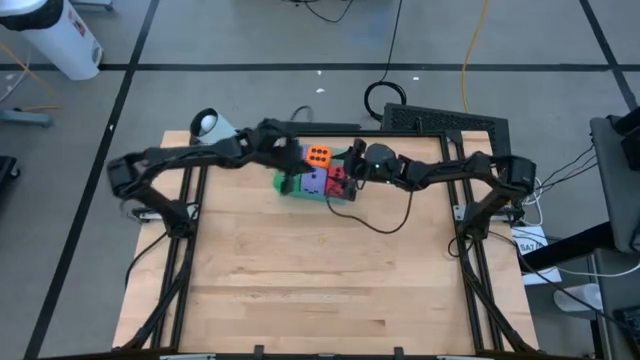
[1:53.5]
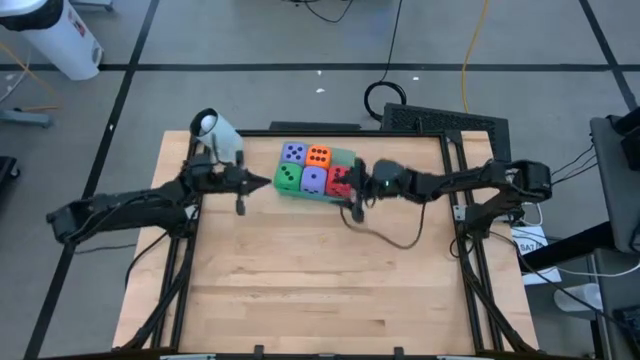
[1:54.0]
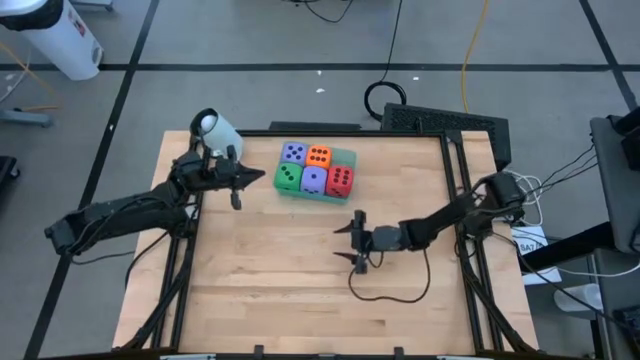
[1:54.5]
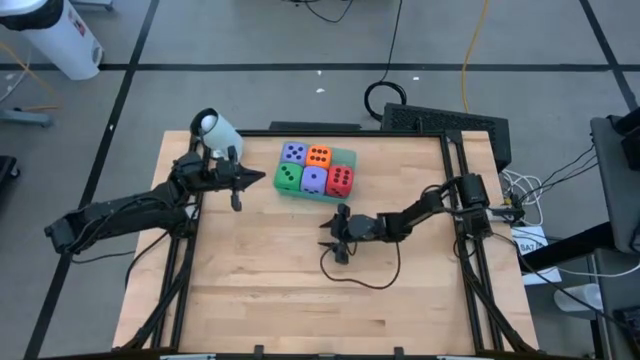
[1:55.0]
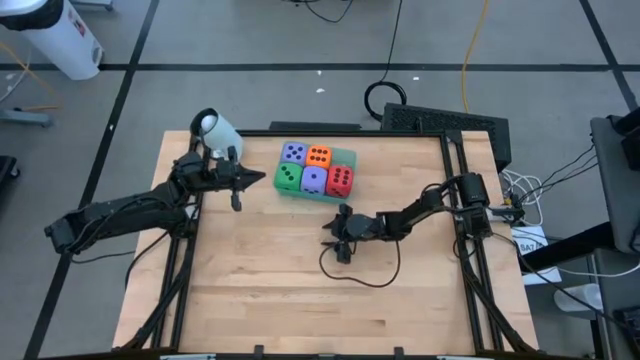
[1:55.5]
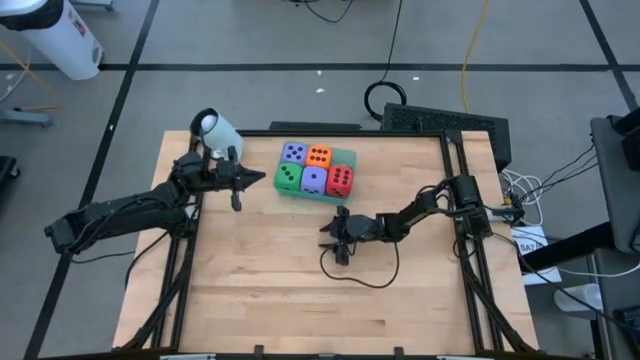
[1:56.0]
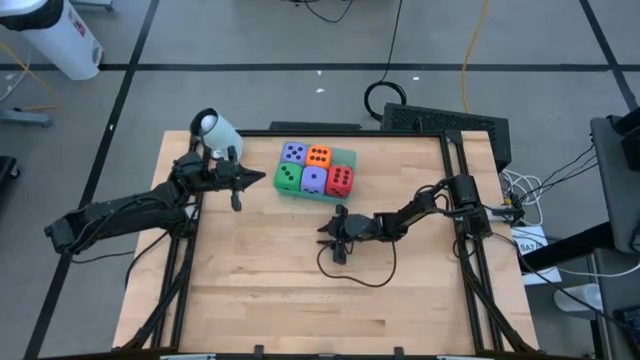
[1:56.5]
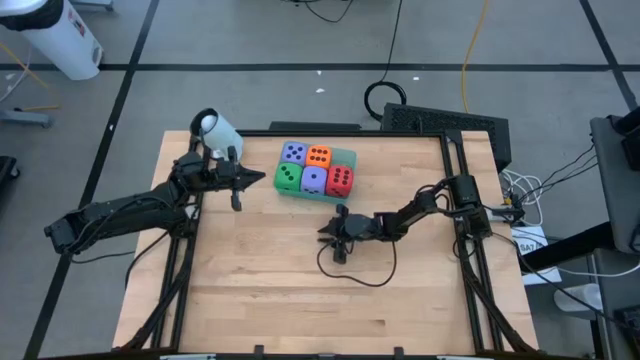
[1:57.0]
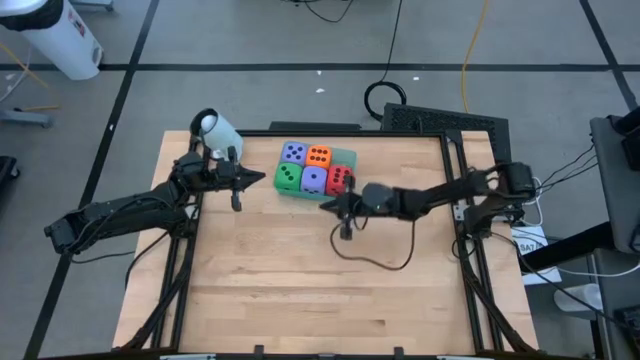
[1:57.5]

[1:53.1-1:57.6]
Task: Pick & Place Dice
Put the small yellow dice into the blue bin

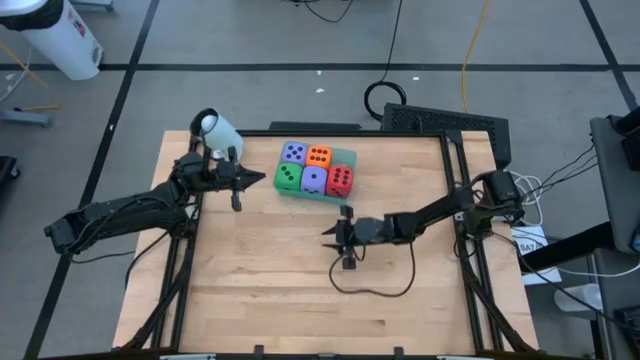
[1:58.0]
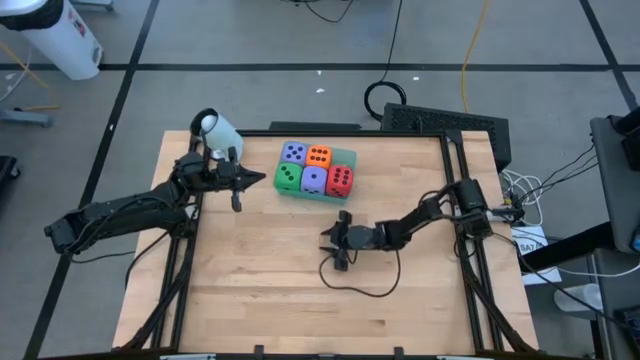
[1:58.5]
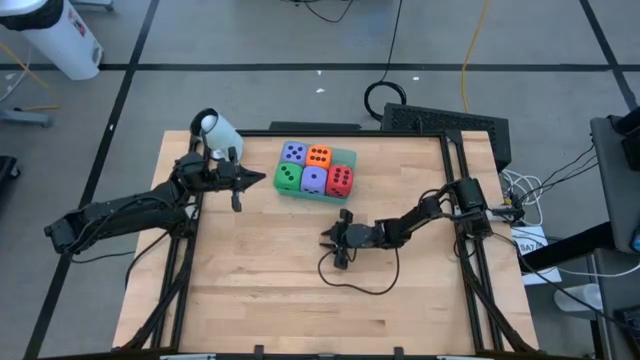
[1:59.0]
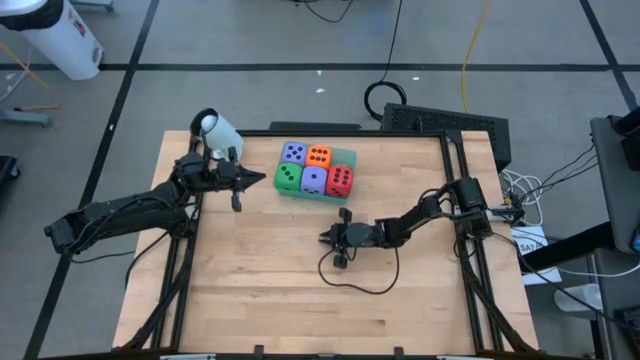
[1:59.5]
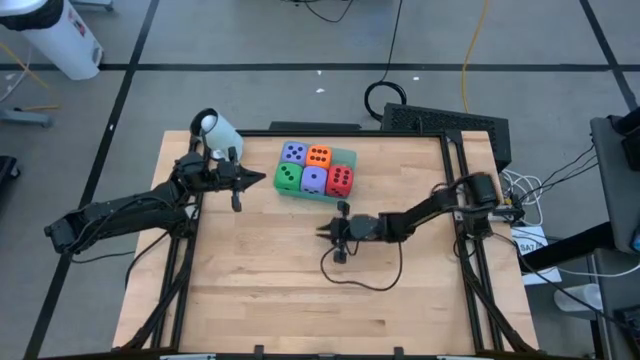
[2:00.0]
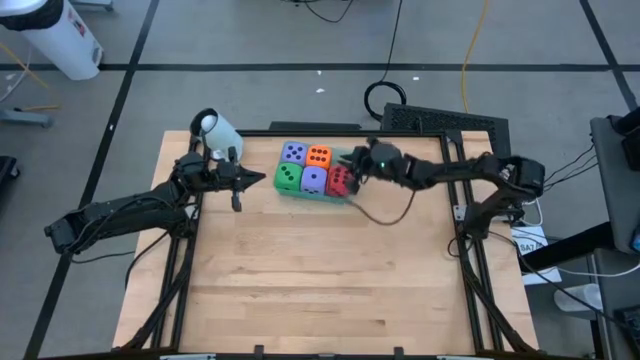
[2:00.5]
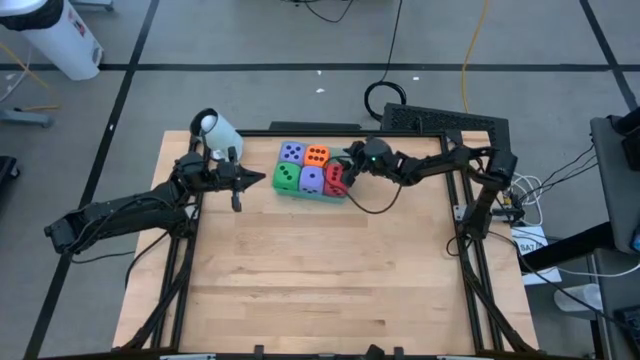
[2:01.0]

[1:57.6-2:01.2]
Put the small yellow dice into the blue bin

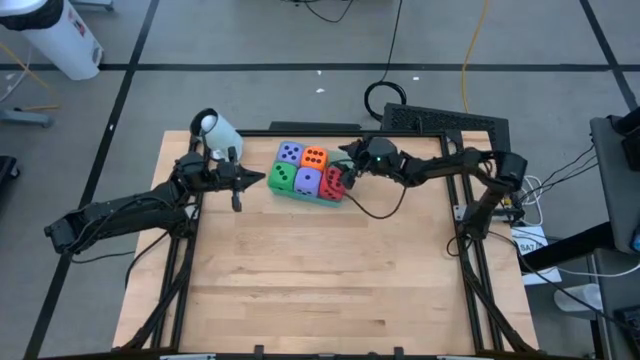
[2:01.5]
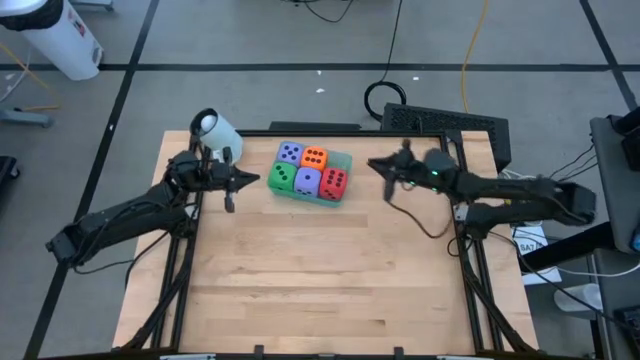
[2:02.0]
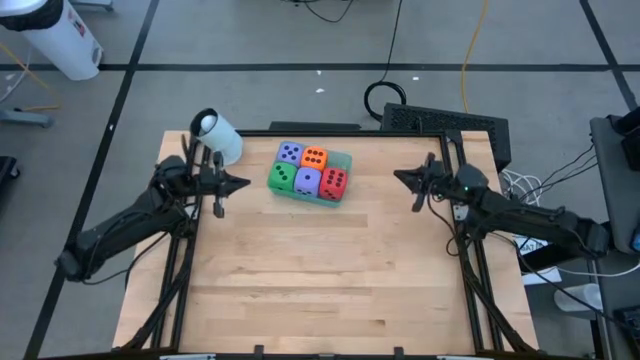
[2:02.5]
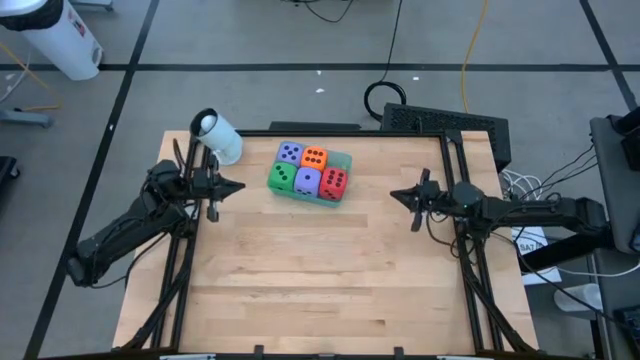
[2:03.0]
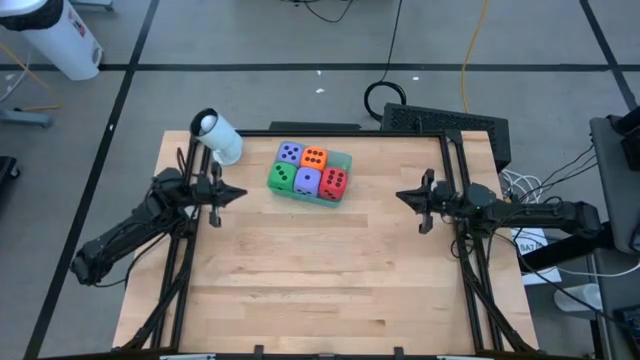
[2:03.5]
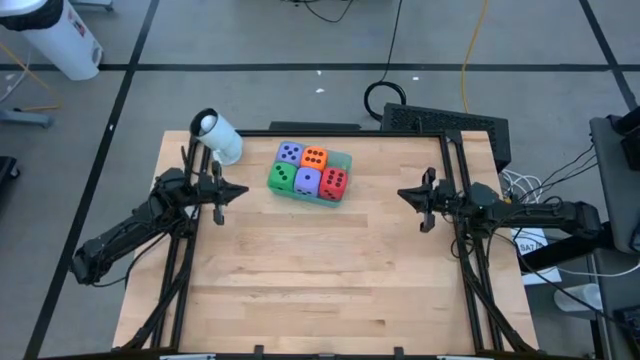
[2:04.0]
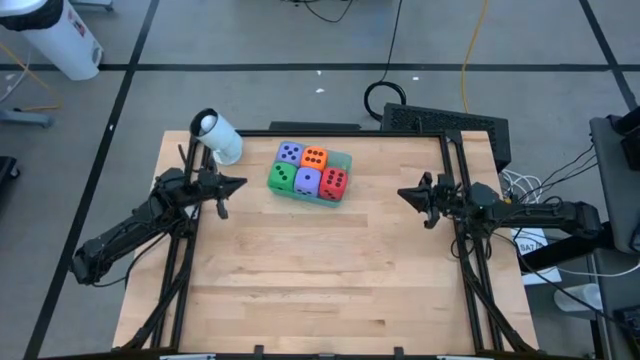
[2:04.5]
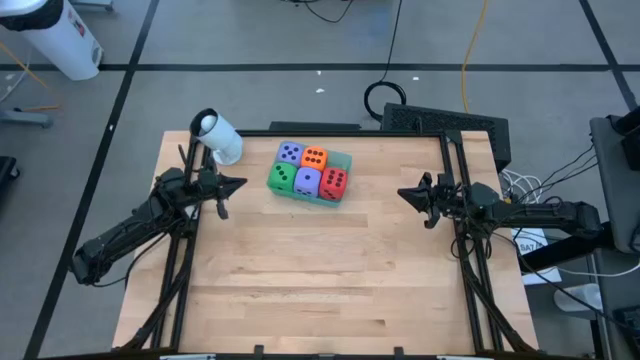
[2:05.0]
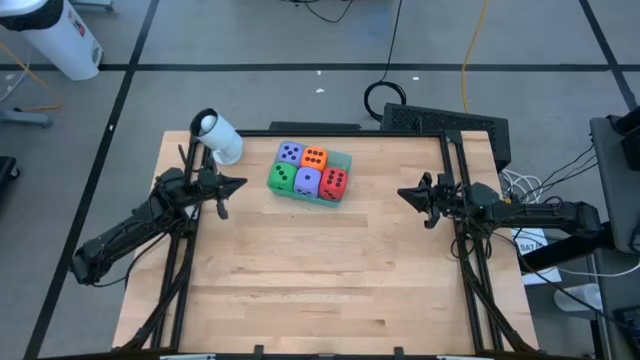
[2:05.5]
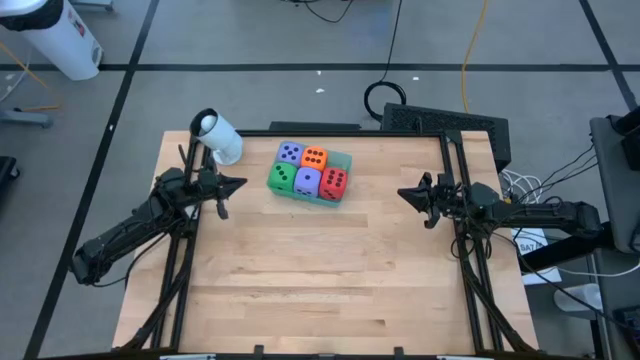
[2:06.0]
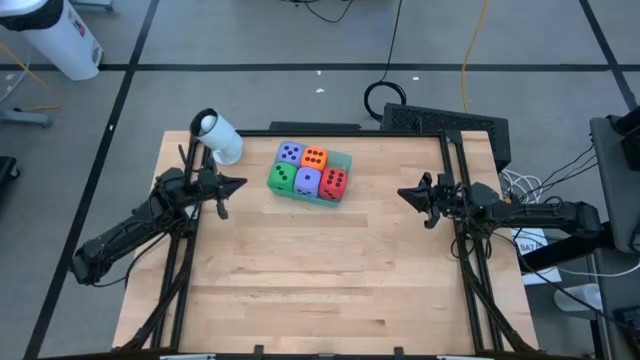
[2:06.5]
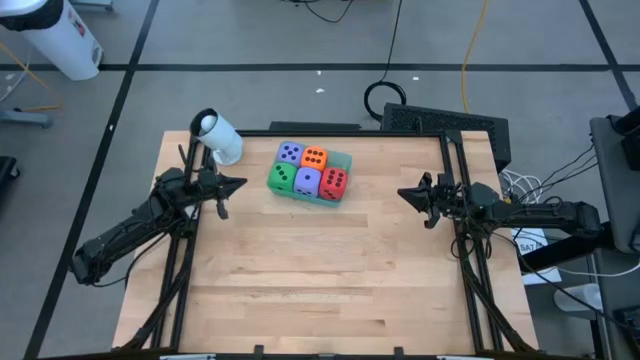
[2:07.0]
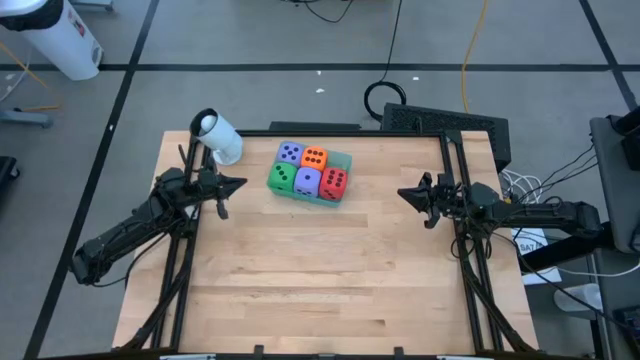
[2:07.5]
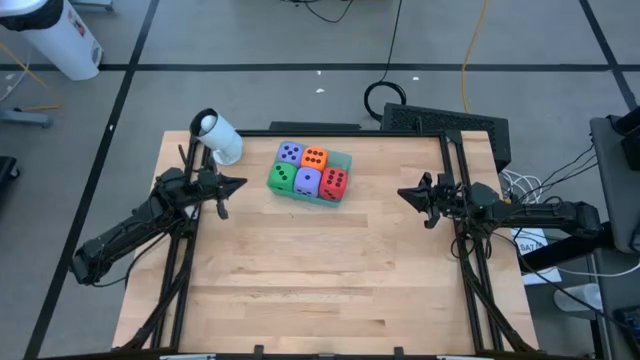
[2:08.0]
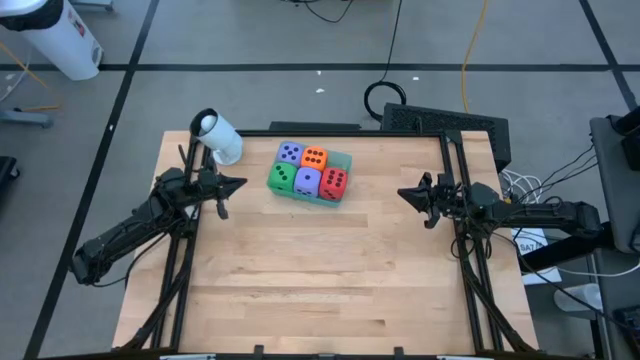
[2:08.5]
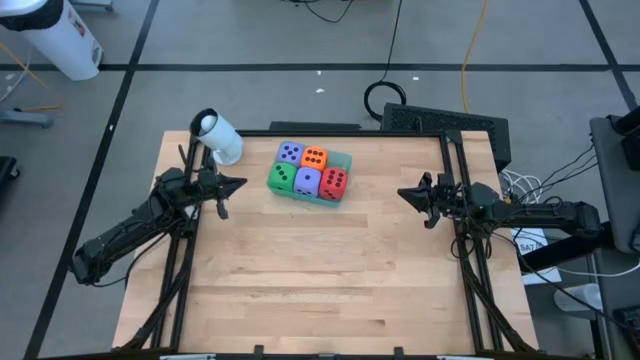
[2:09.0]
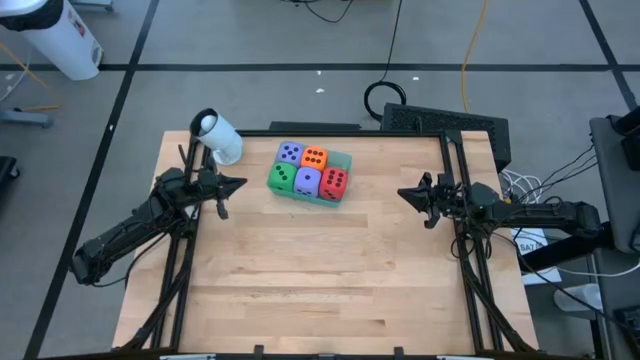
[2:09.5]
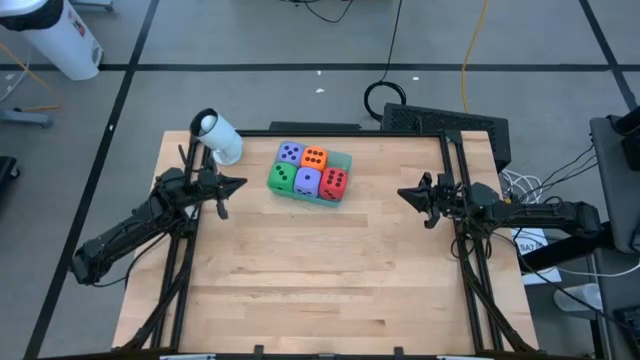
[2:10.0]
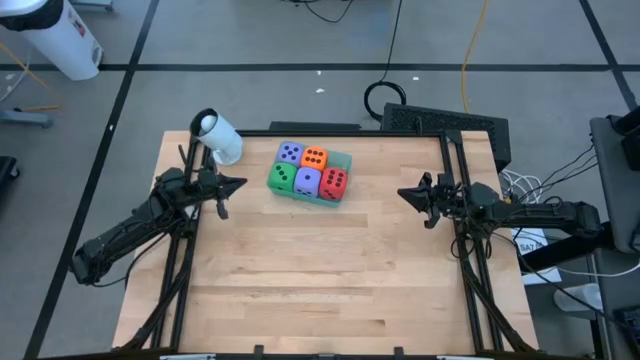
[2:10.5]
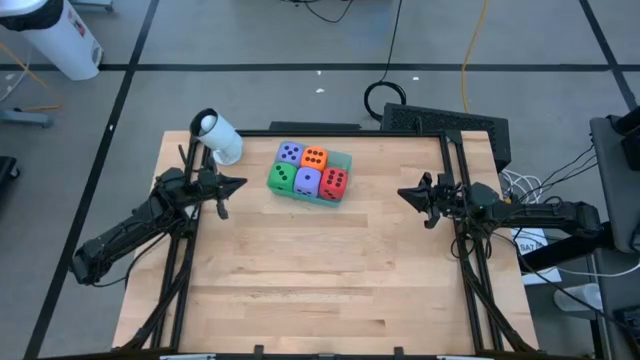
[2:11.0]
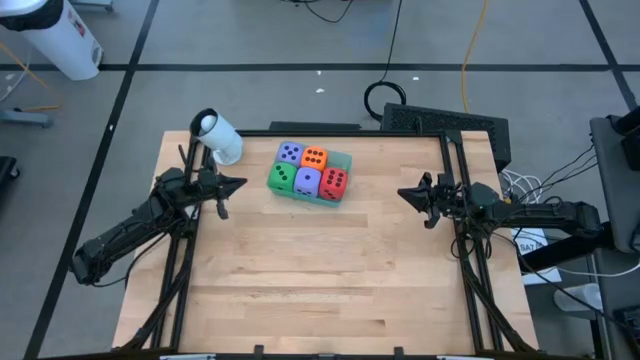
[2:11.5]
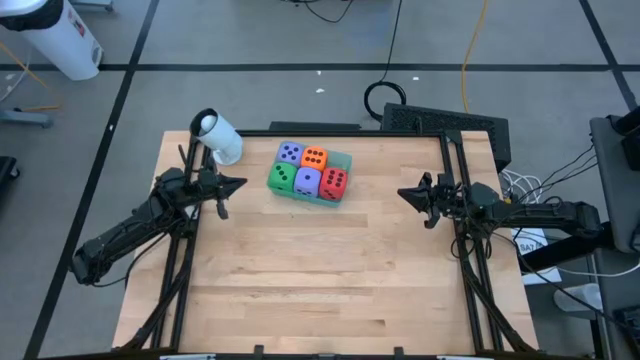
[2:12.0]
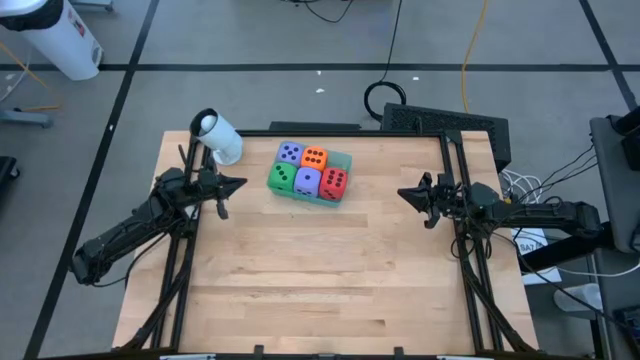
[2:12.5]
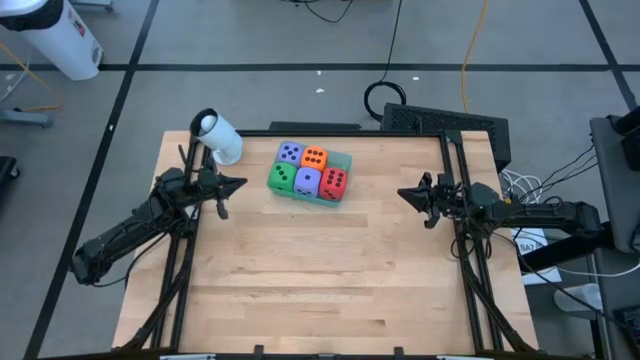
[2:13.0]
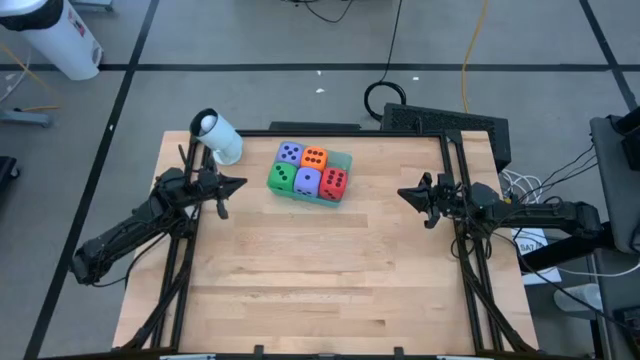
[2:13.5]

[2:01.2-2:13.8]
Return to Home Position

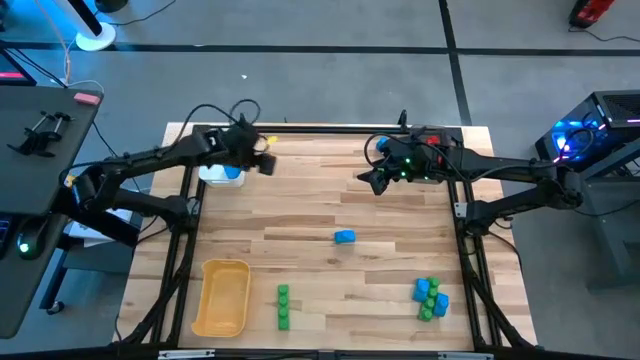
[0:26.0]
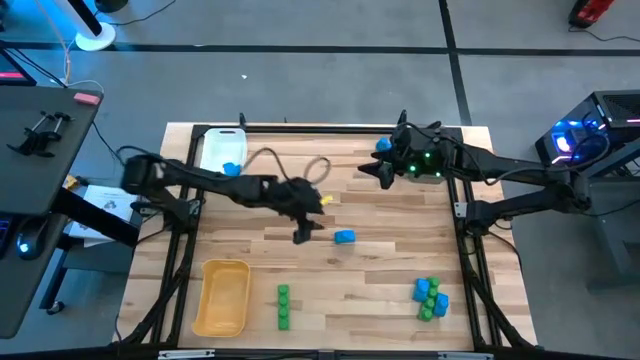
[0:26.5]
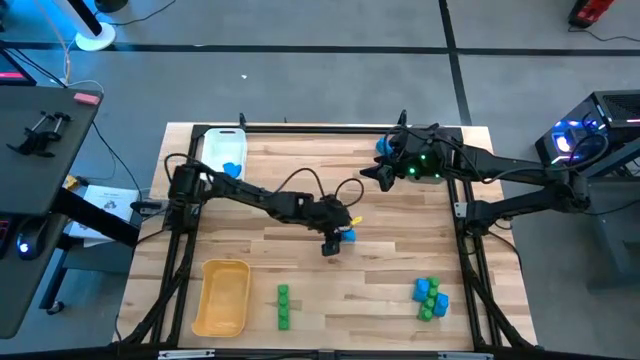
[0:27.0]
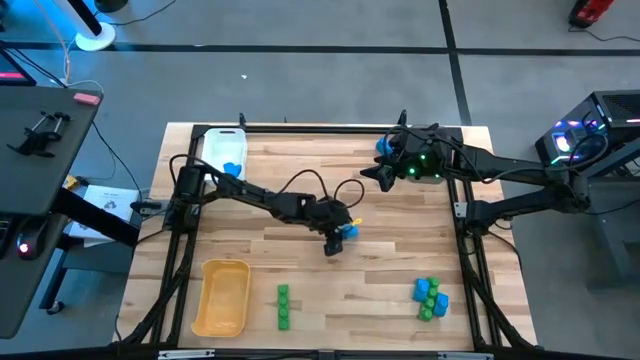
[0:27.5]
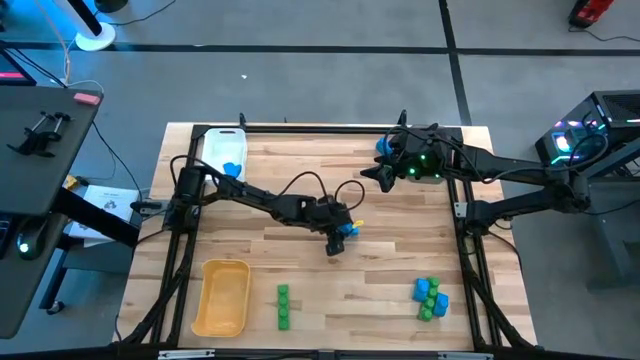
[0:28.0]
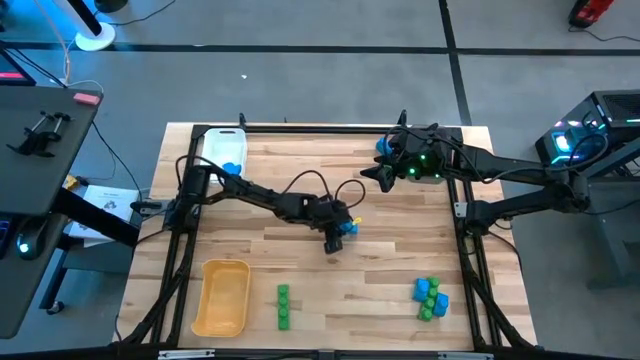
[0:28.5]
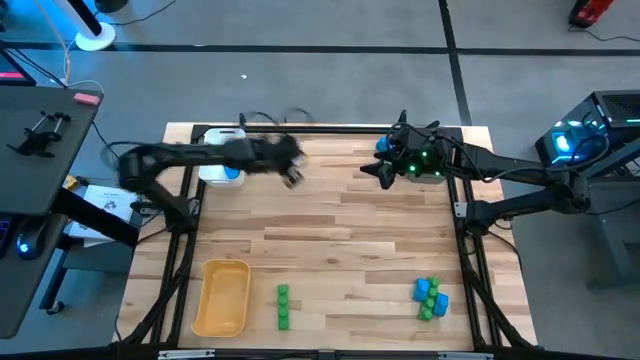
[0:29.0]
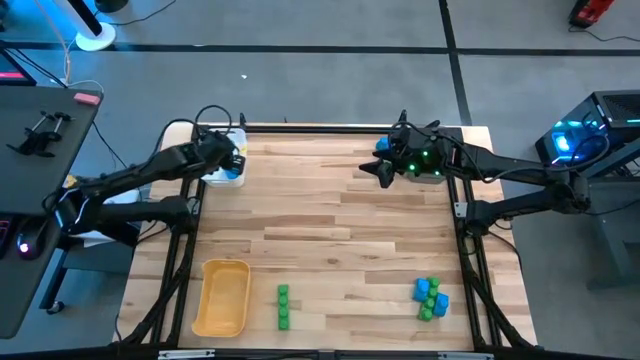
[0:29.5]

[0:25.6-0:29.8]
Task: Sort blocks
Put the blue game piece into the white bin
